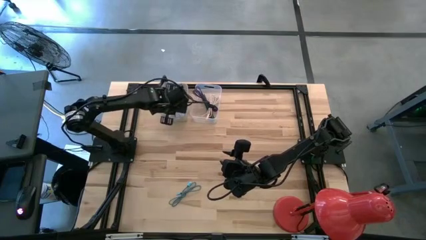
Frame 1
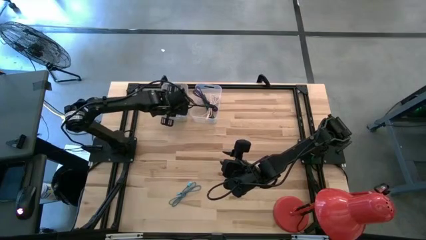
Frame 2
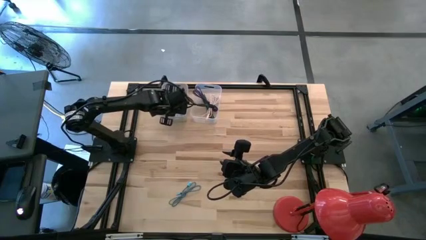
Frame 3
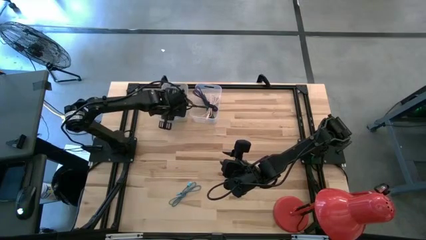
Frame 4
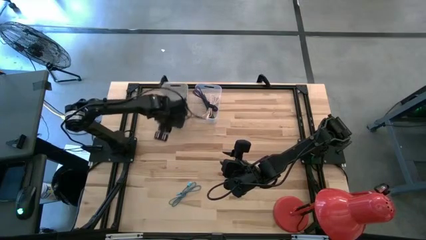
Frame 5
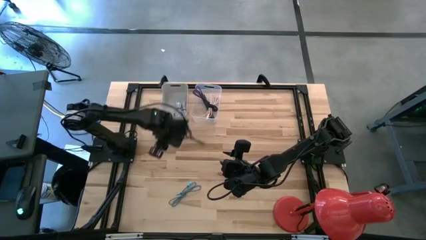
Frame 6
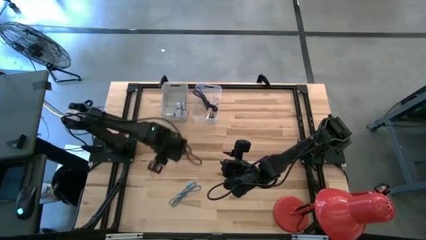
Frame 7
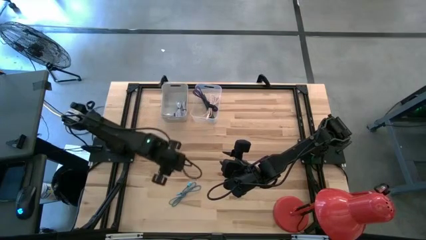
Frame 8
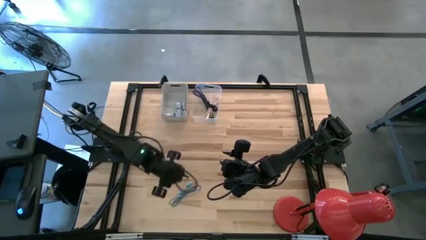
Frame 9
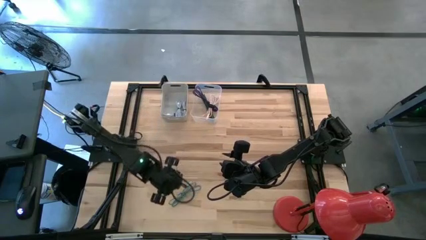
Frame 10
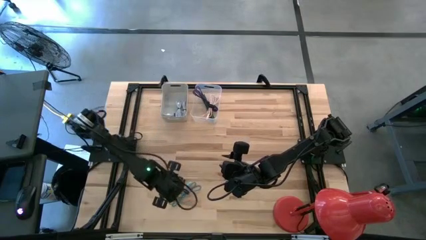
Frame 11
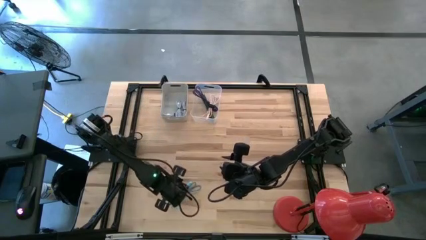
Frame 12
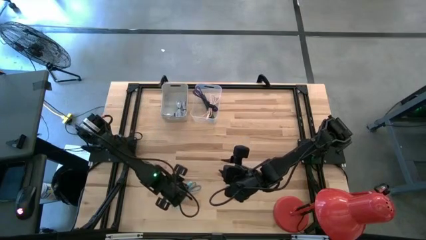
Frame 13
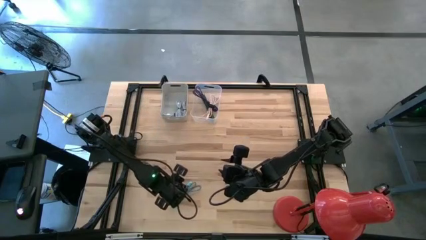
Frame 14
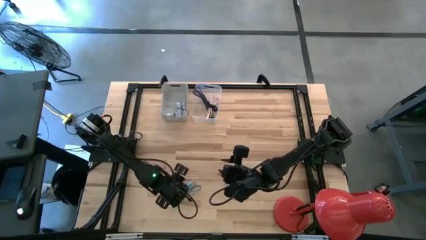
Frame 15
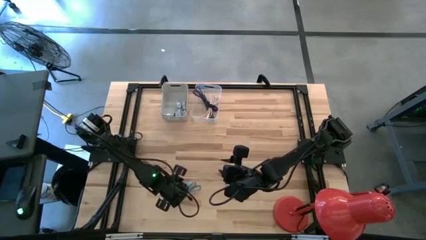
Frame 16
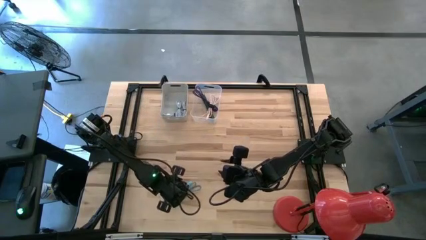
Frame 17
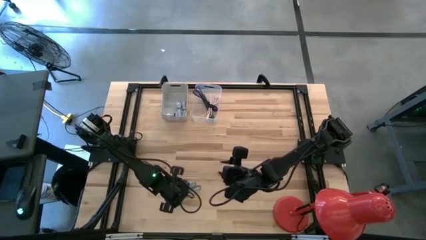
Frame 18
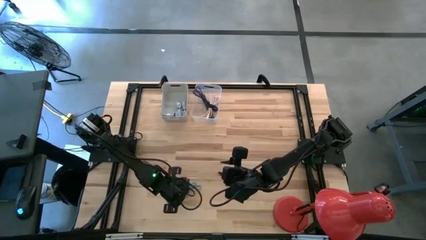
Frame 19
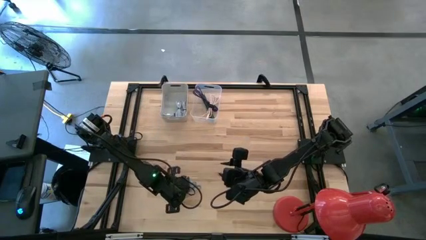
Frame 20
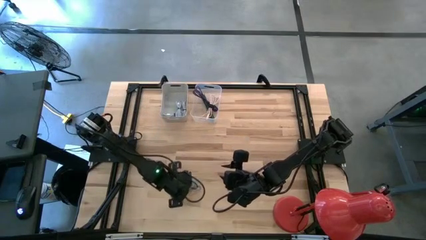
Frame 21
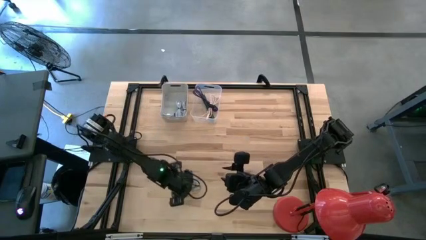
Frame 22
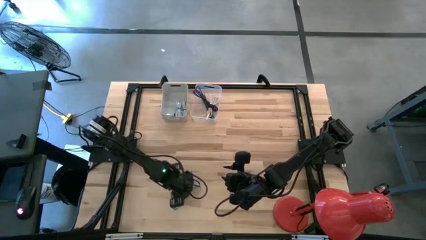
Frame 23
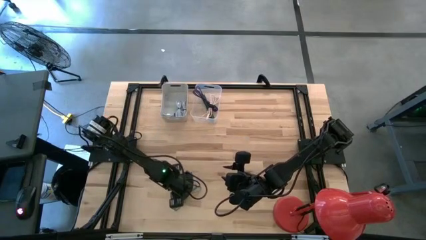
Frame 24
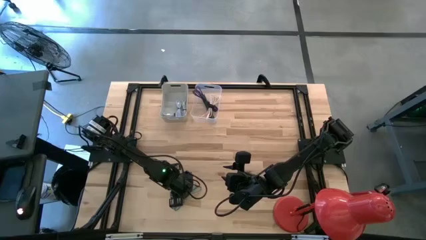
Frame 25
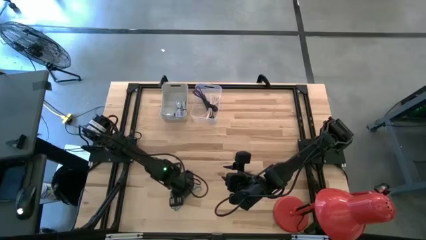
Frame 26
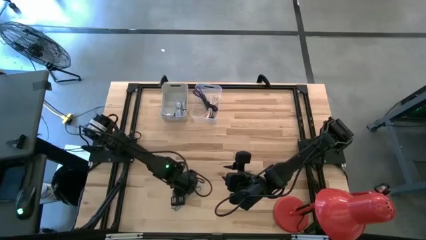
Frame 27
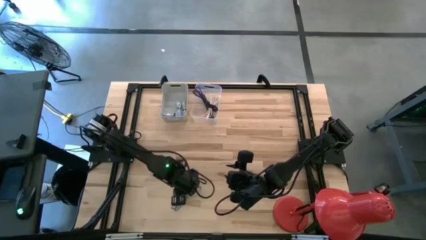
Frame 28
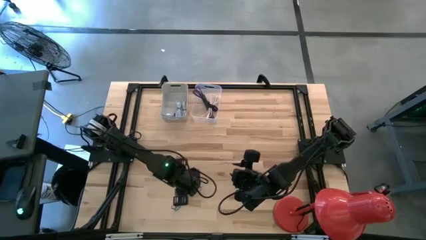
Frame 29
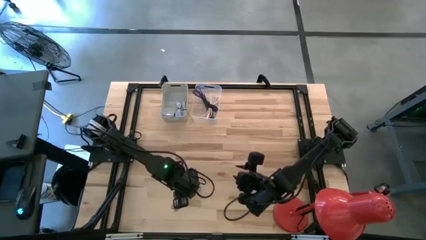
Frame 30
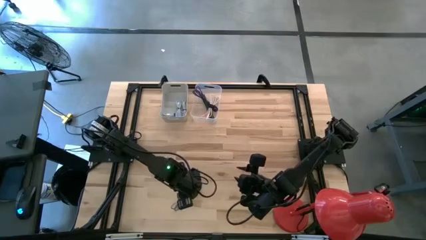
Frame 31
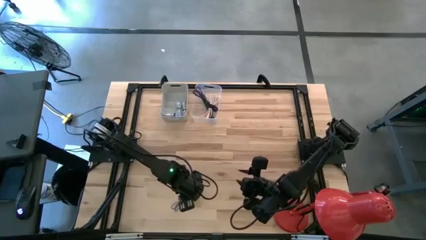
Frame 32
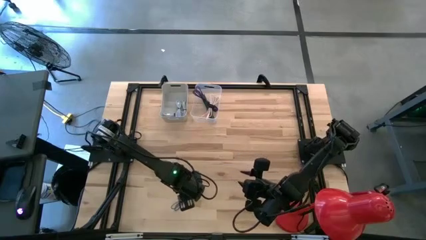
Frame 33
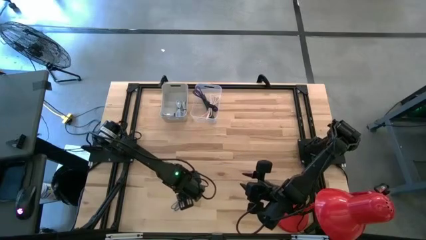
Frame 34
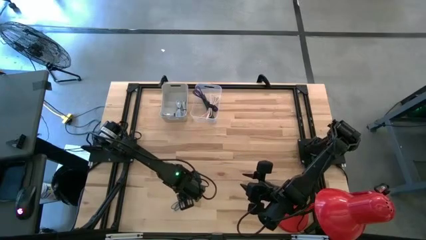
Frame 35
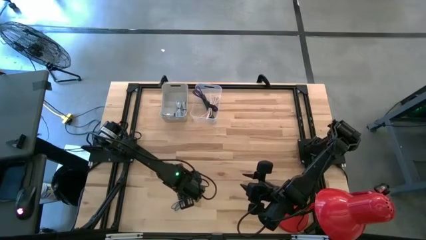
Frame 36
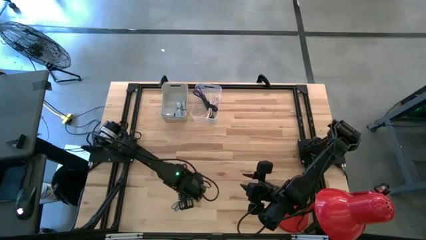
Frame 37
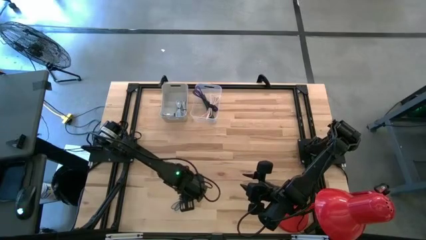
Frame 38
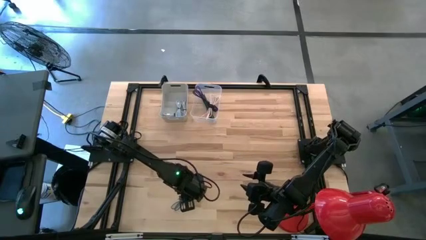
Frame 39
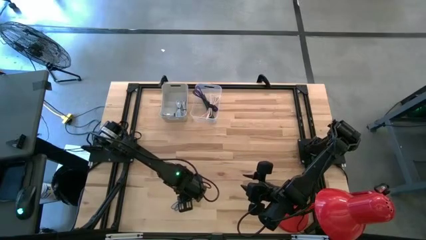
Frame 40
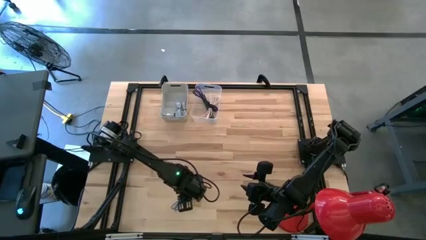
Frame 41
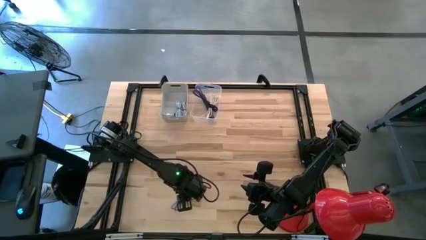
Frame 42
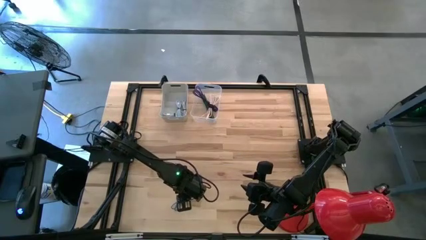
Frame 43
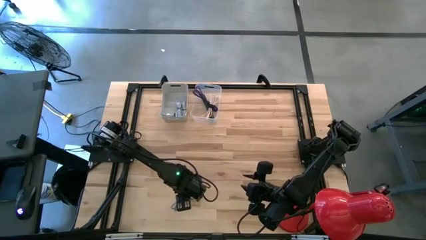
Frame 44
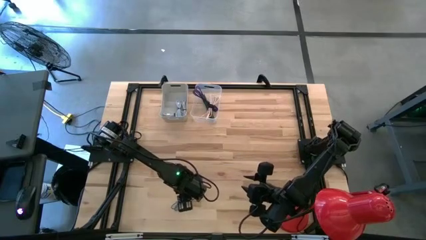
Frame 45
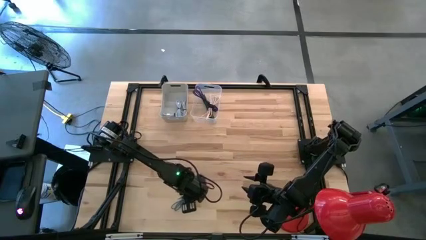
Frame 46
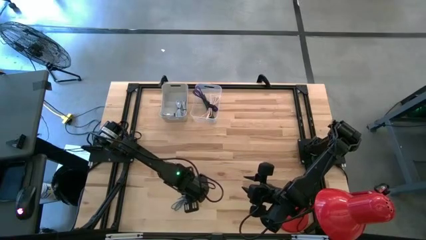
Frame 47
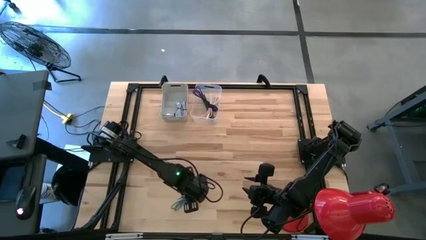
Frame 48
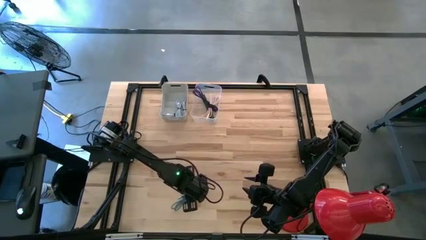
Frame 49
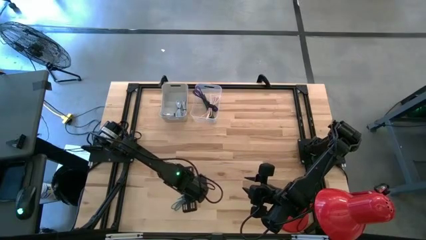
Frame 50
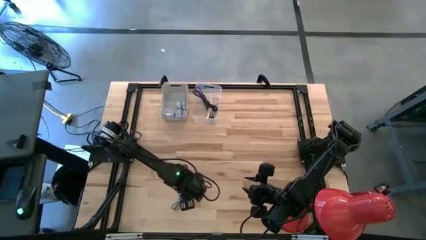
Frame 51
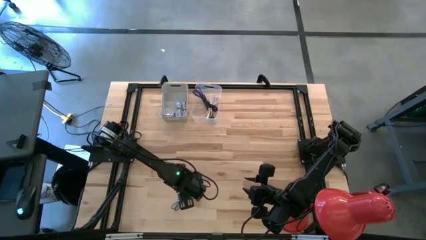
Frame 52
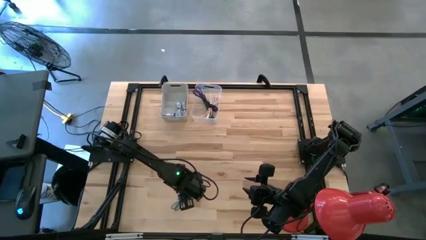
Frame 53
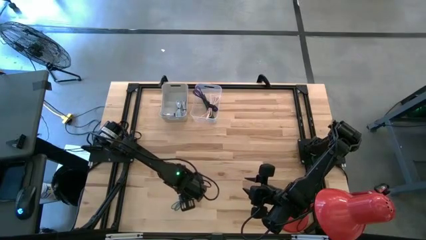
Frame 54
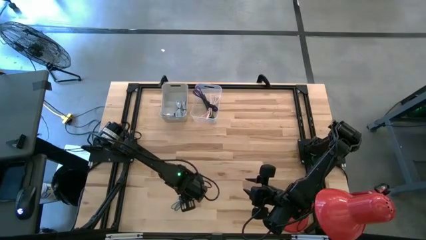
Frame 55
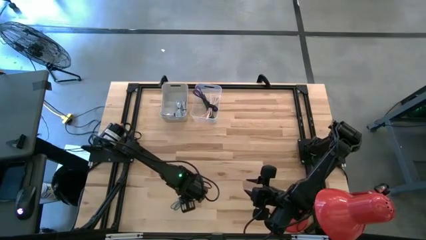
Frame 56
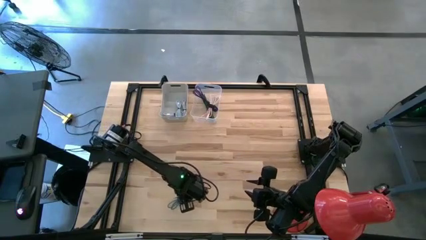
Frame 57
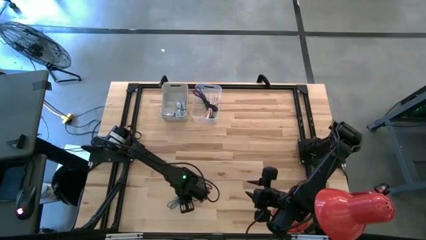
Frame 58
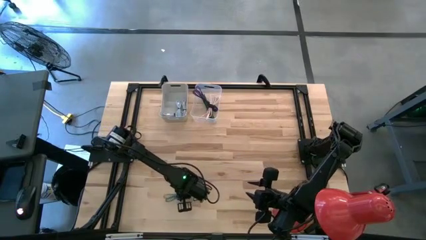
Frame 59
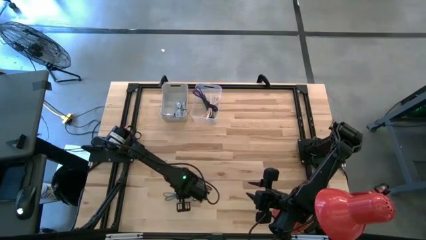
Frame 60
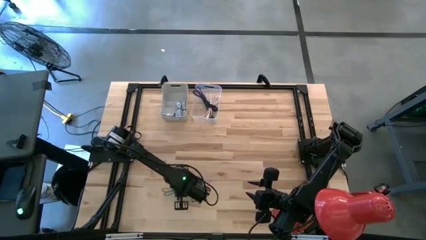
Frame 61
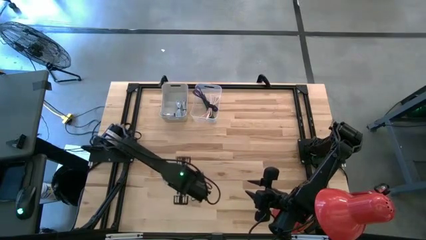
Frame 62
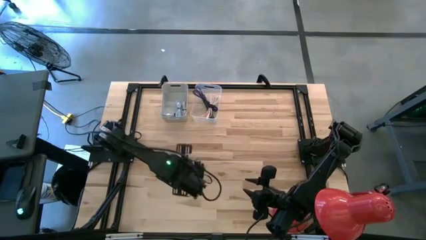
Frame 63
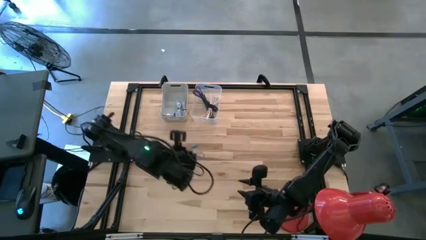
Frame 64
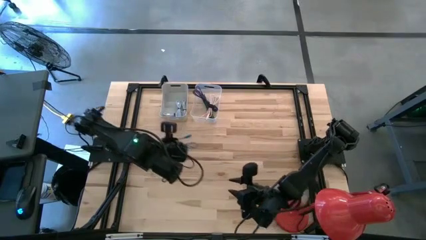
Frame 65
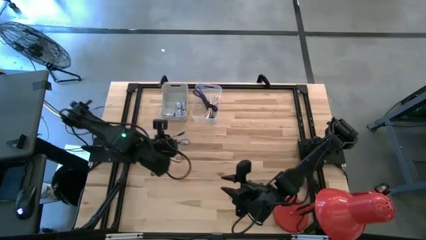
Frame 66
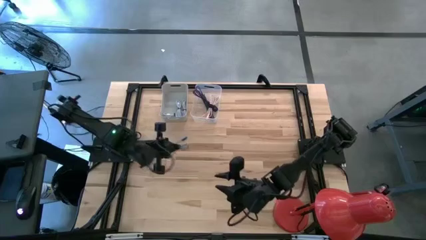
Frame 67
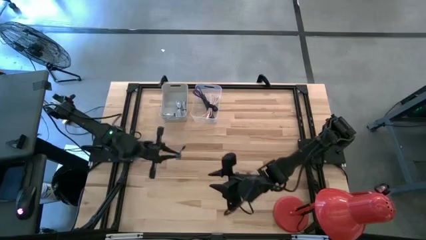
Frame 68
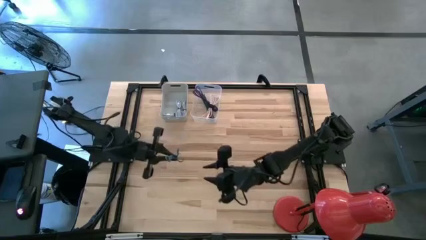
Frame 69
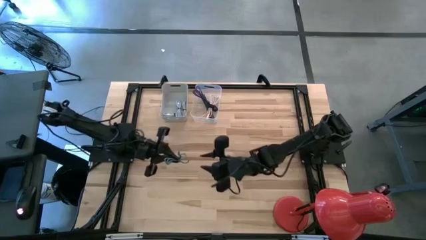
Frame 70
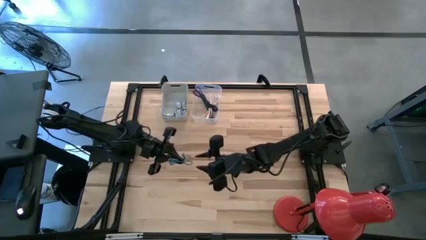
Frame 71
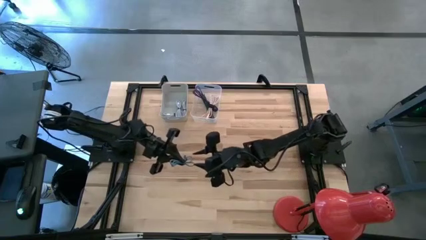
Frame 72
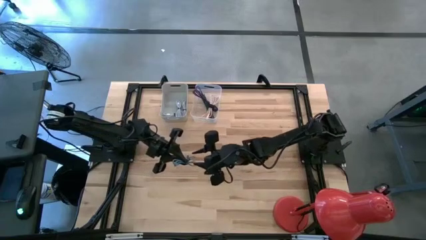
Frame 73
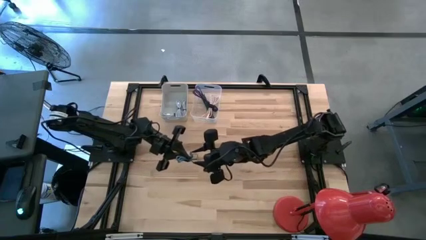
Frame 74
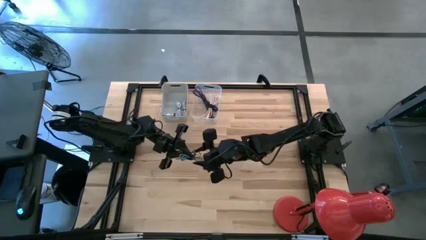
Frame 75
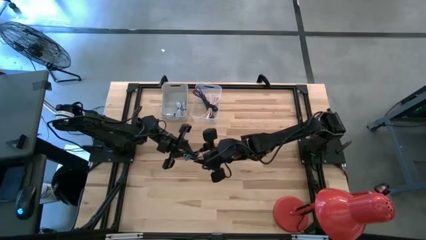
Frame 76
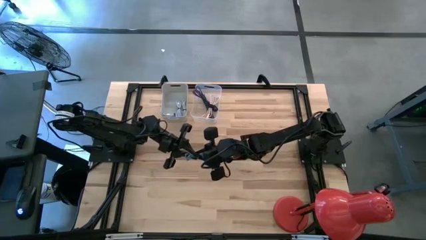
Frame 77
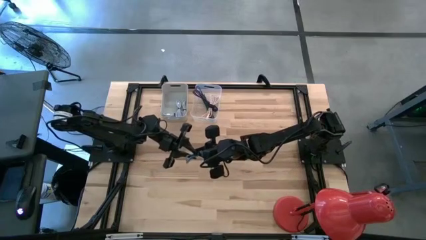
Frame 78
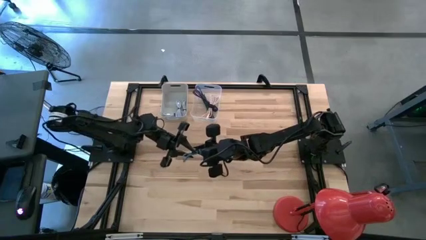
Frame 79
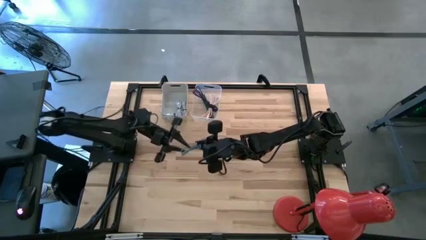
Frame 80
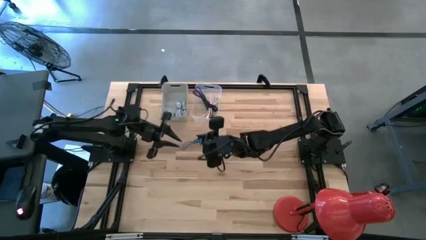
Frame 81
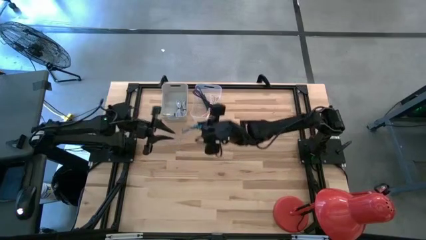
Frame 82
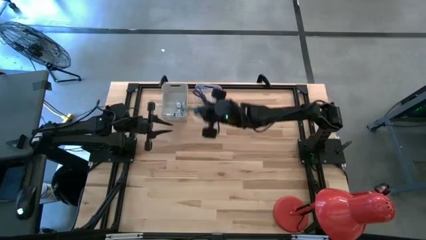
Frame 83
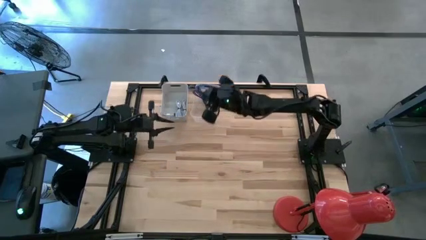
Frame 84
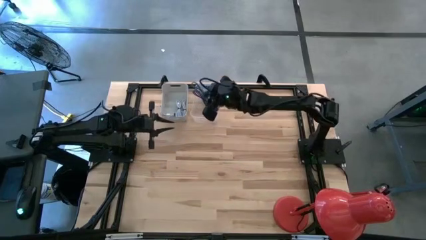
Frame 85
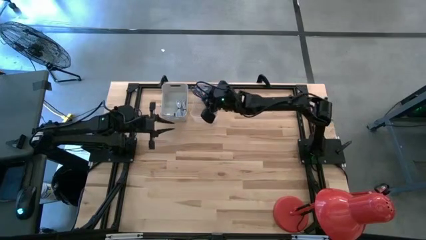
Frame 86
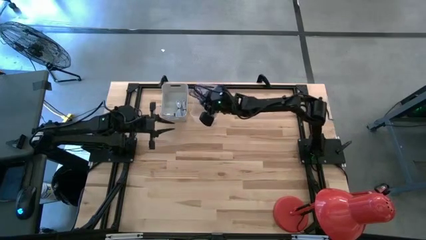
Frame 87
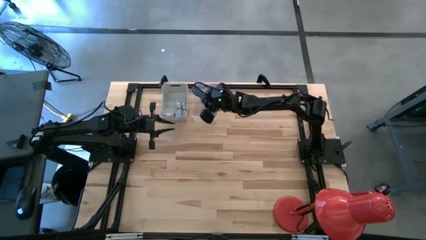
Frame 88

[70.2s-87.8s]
Task: Pick & Place USB Port
Put the striped light blue charger cable into the transparent bin
